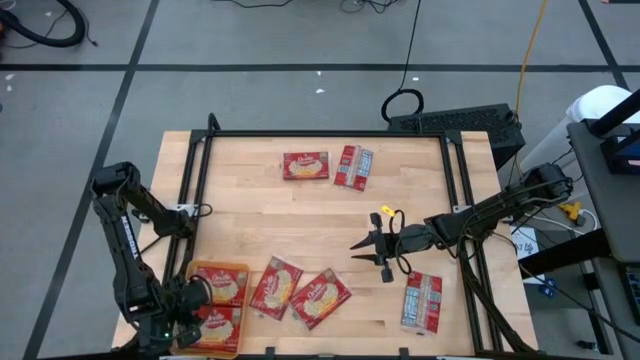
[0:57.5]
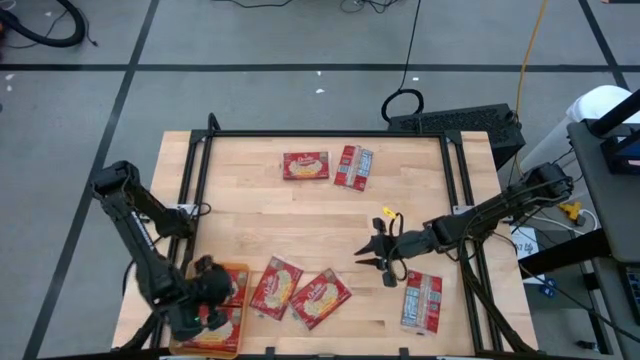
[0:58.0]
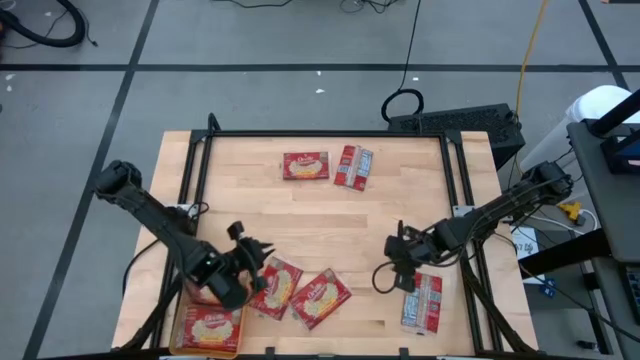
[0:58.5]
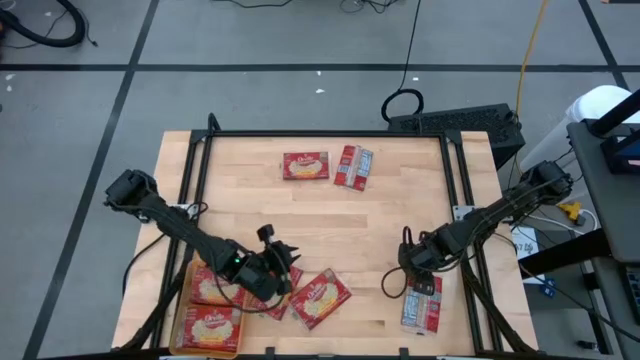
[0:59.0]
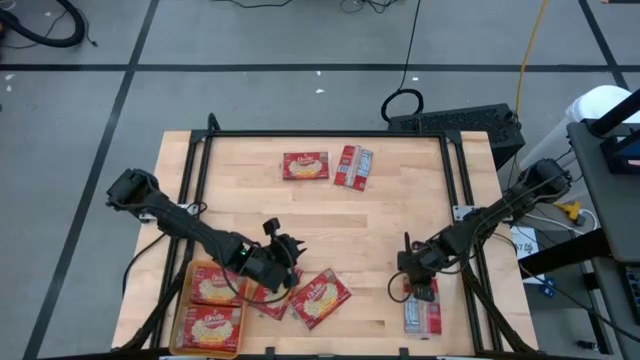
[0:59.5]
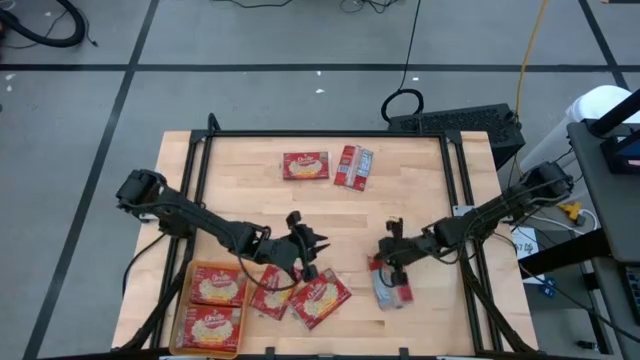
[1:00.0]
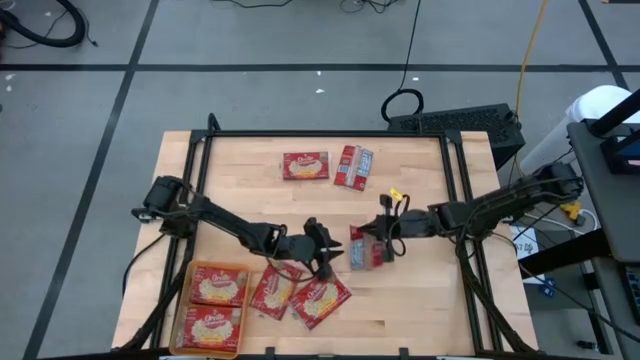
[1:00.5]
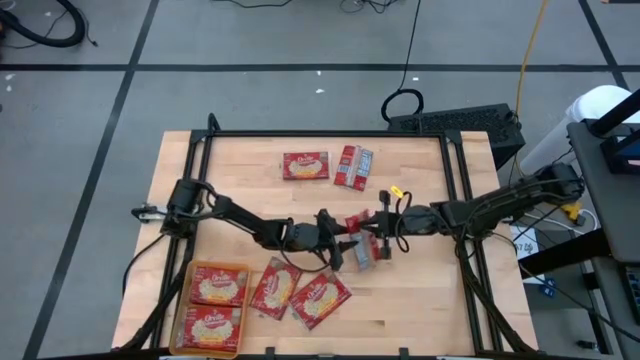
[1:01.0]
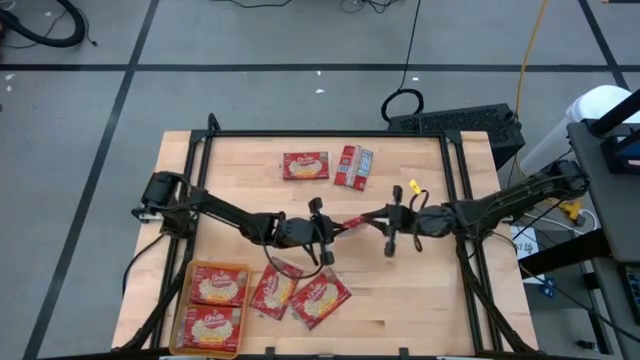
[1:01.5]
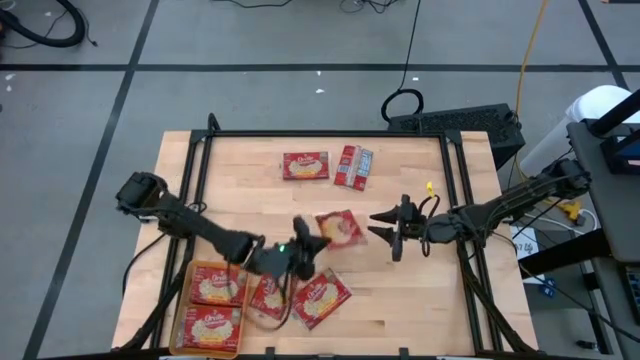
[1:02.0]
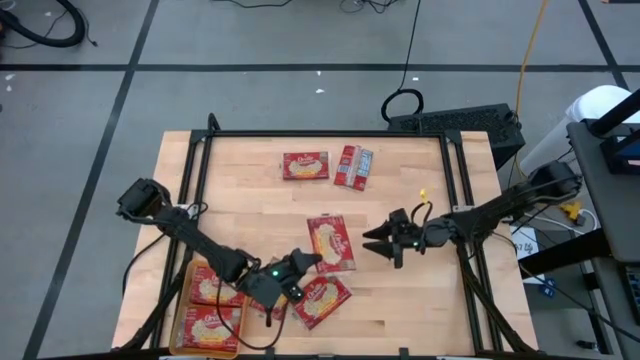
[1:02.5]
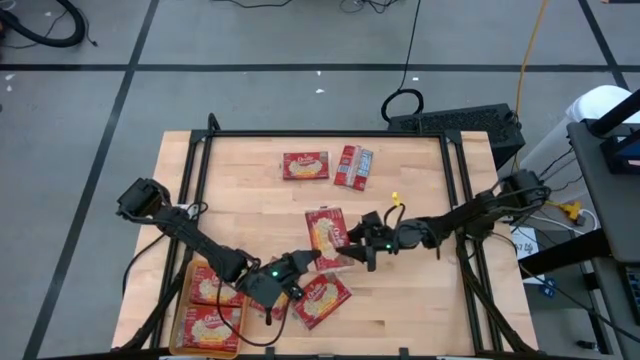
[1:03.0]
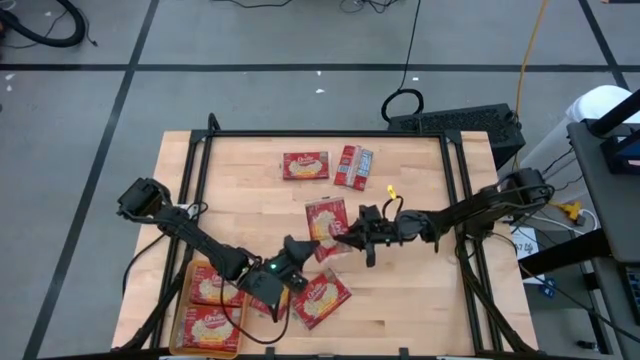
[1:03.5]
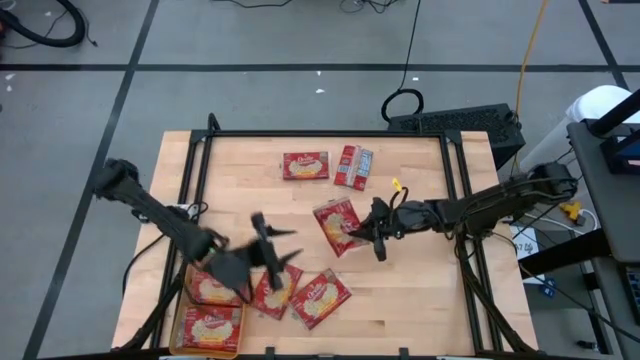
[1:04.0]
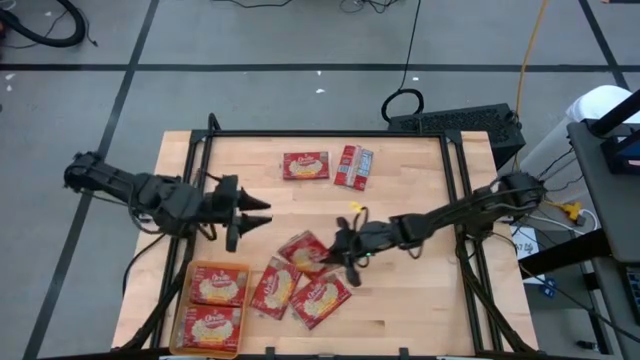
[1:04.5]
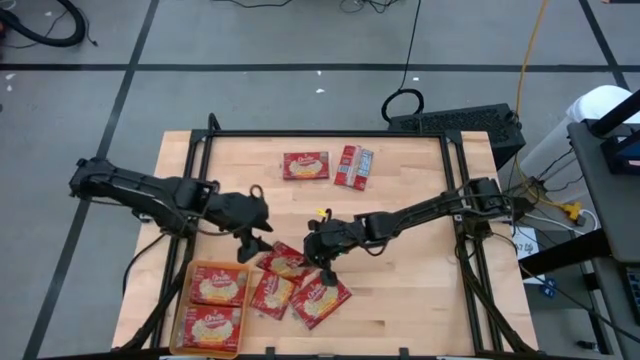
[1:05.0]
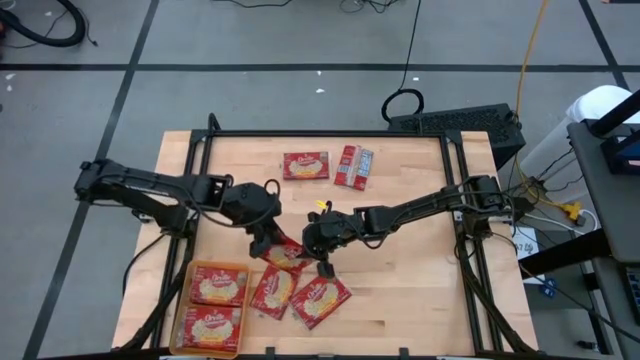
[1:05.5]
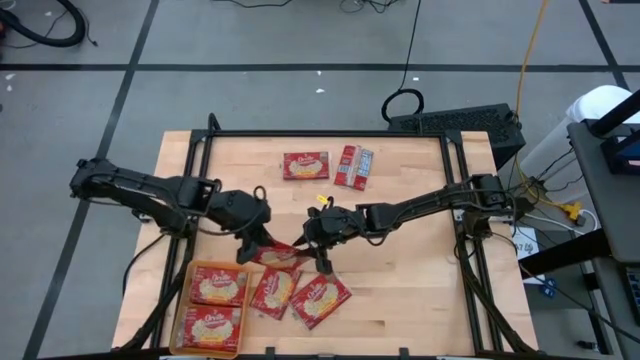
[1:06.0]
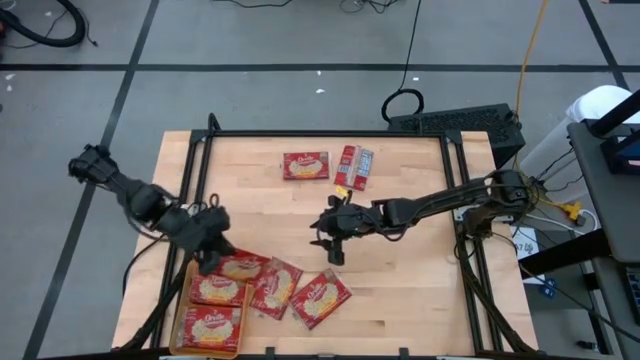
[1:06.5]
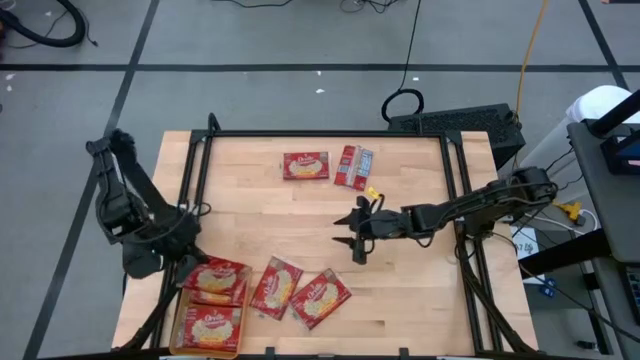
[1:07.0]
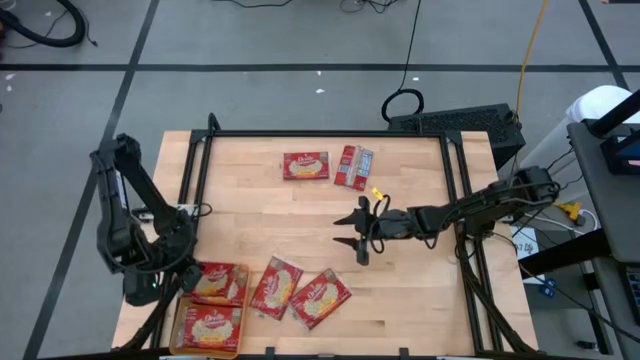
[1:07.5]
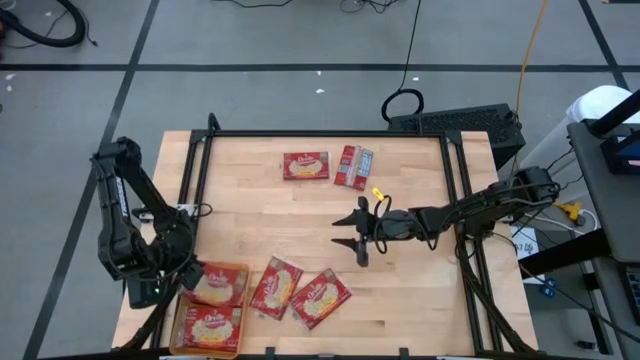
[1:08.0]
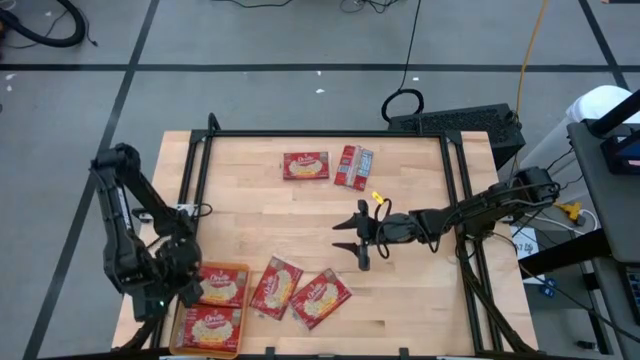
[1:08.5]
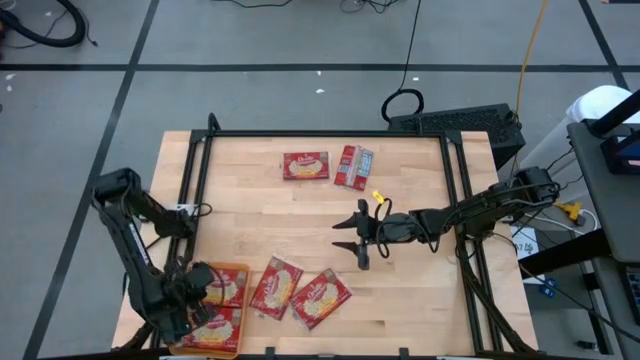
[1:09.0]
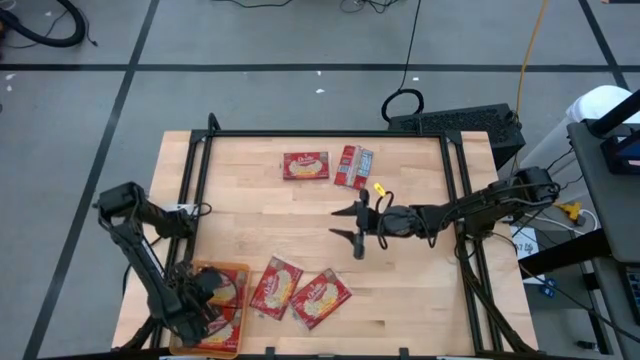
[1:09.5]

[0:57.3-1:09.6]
Task: Sort popcorn bags into baskets
Put the red popcorn bag into the orange bin

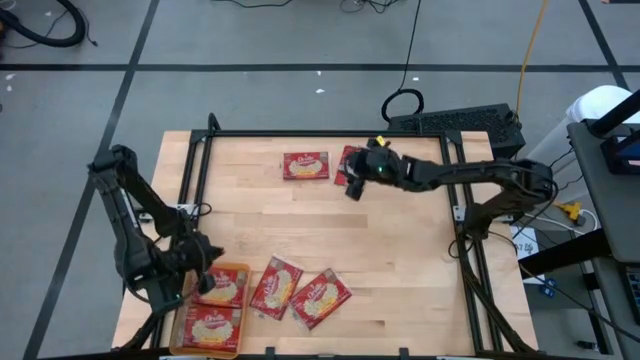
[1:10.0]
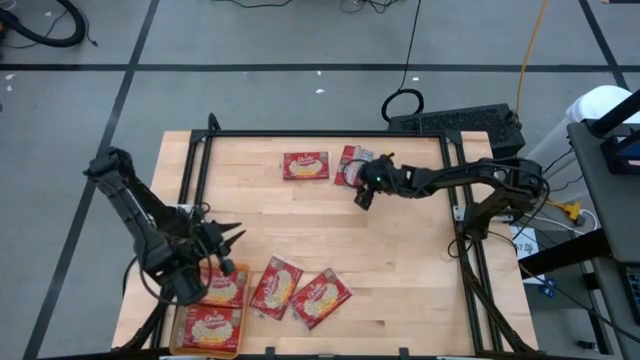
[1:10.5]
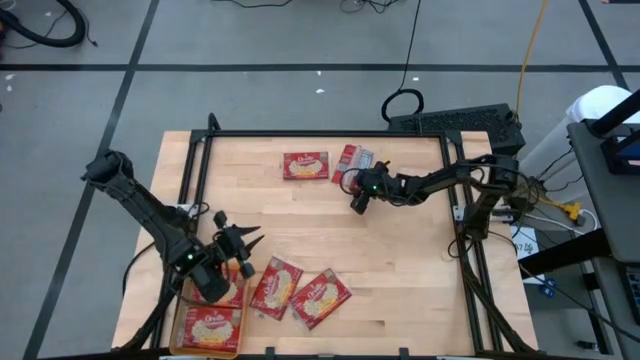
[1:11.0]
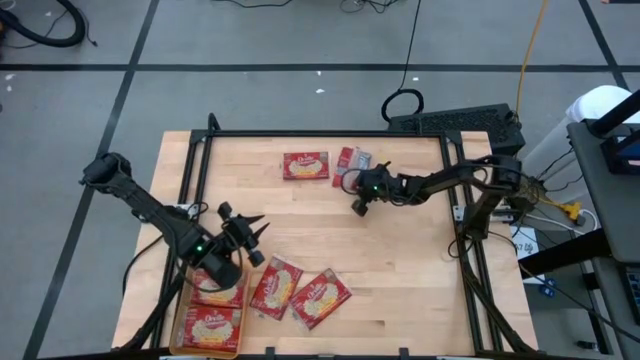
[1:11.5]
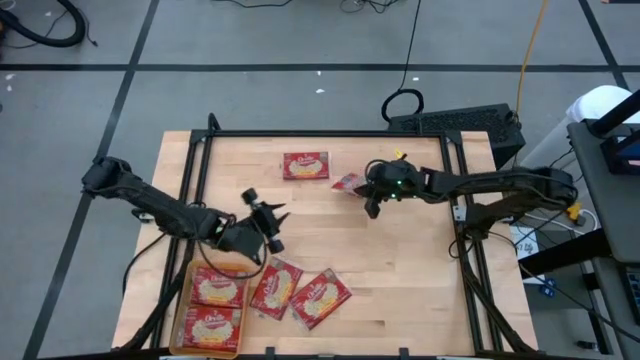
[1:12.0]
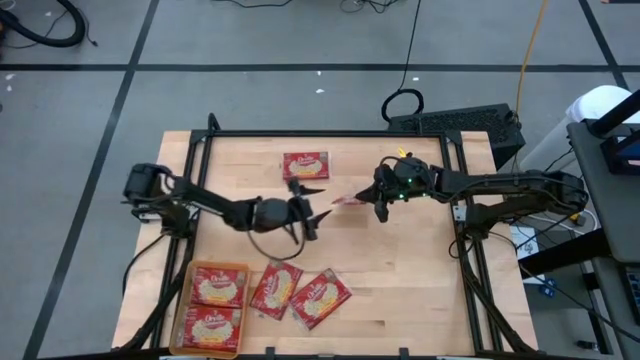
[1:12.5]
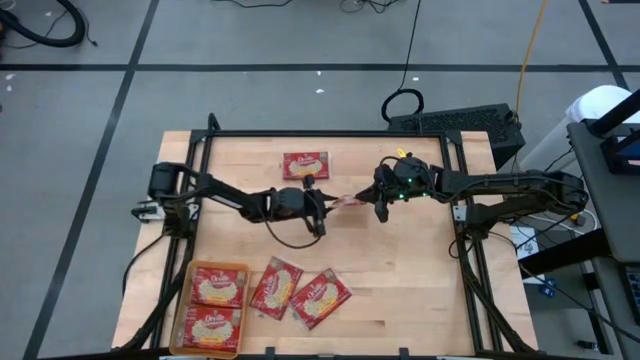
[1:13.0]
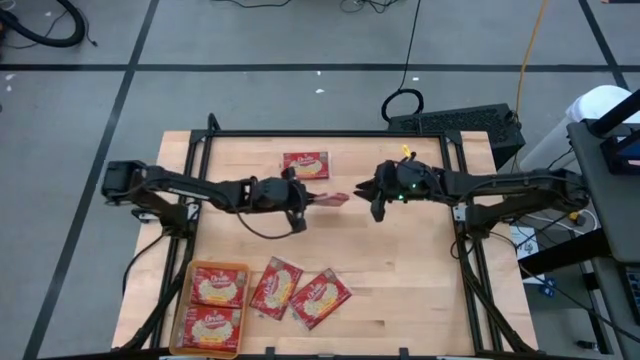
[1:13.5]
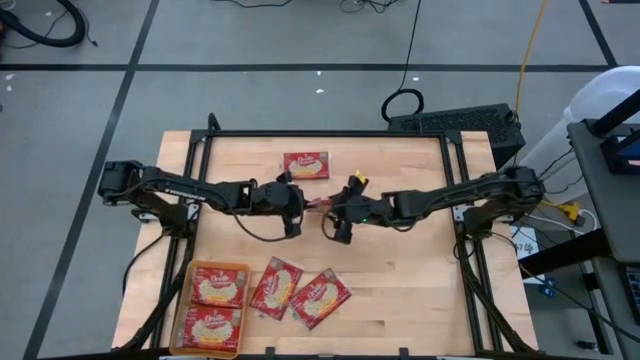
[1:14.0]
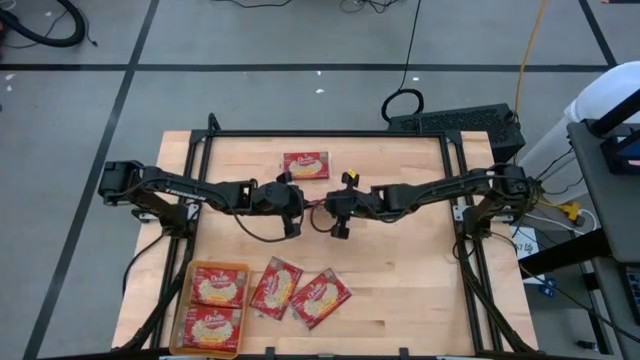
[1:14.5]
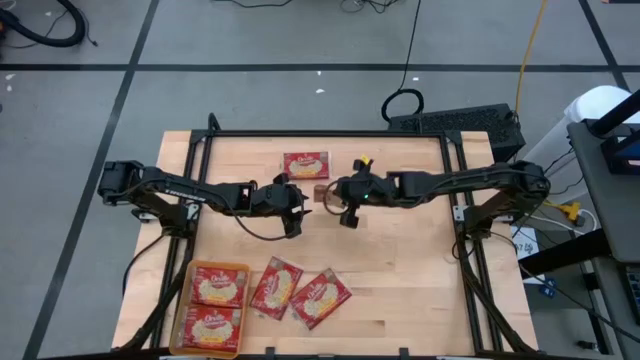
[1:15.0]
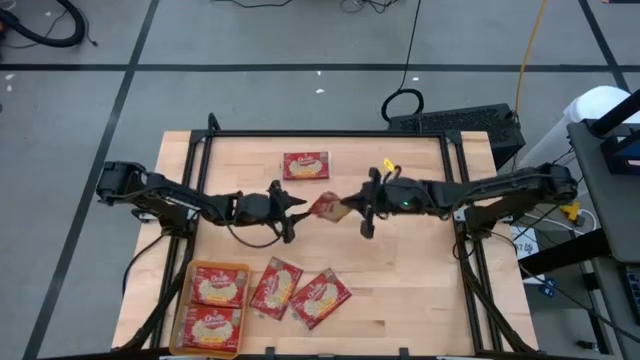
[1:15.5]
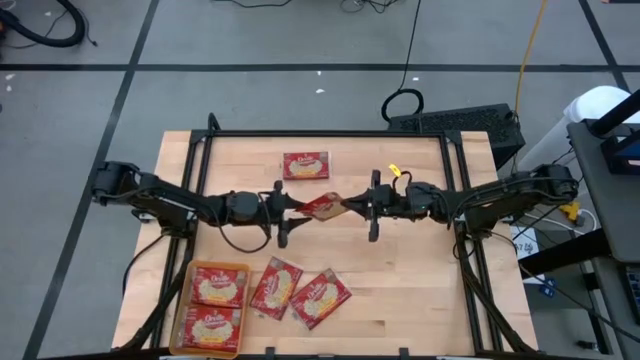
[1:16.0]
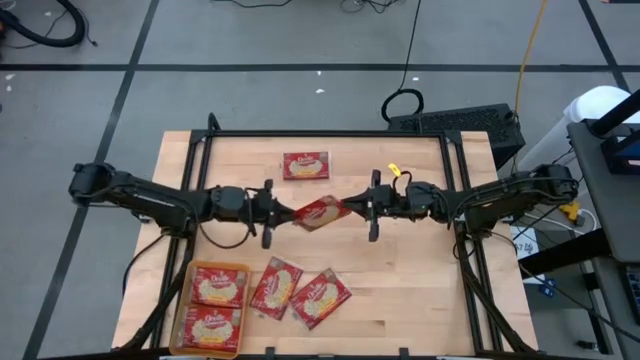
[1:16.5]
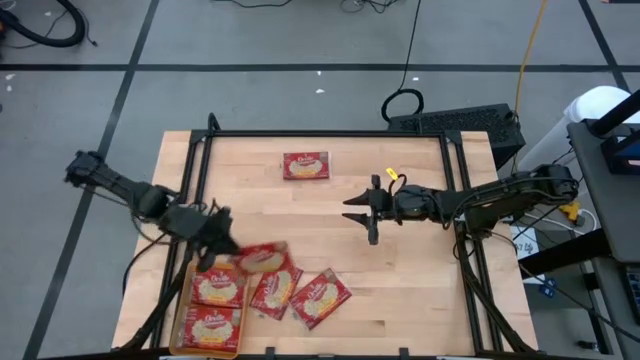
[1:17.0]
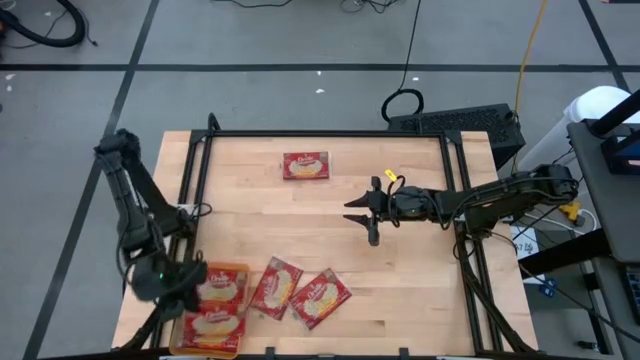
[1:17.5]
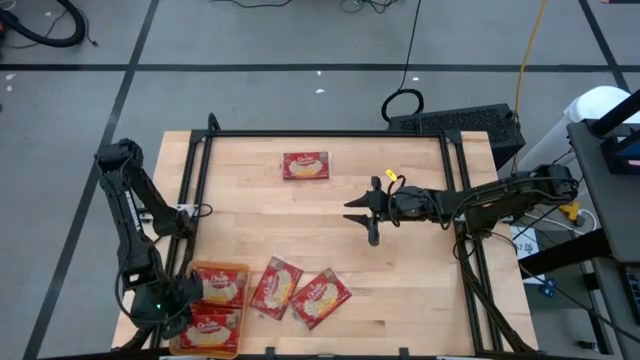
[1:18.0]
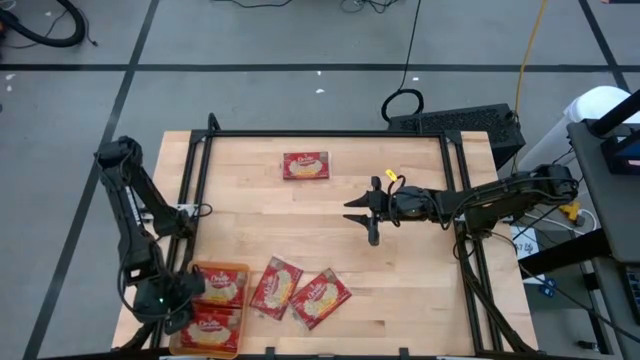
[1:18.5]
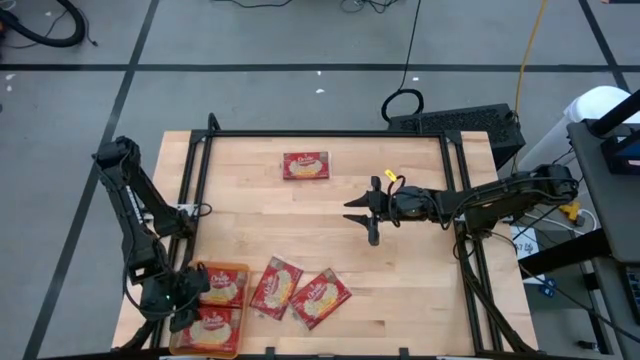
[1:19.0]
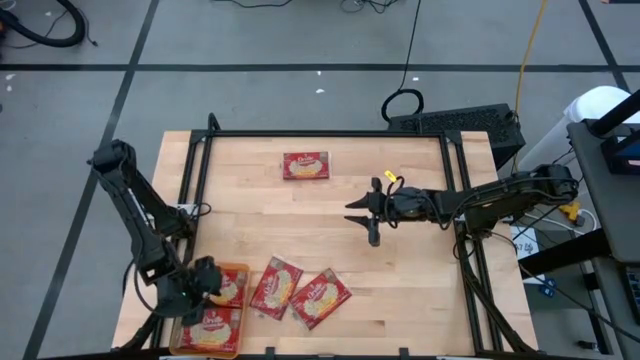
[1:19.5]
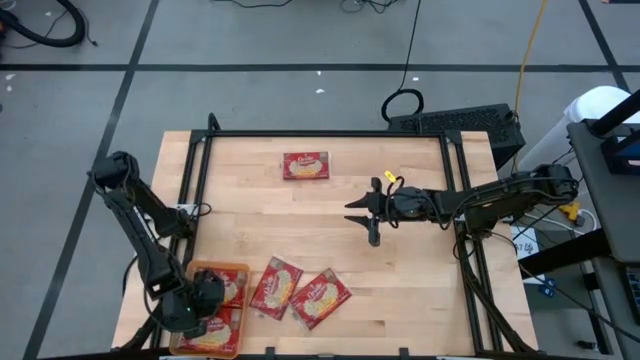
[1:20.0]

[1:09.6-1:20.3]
Put the red popcorn bag into the orange bin
